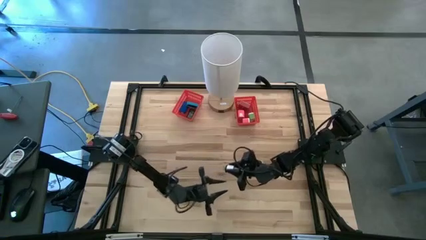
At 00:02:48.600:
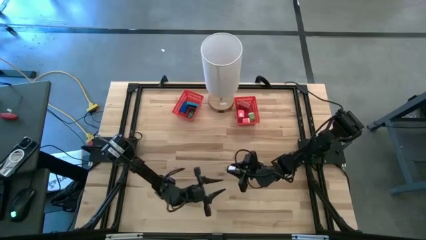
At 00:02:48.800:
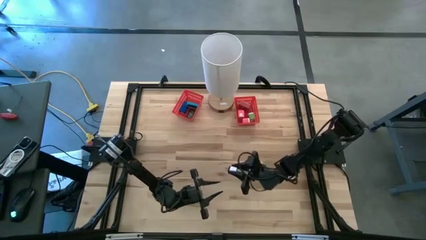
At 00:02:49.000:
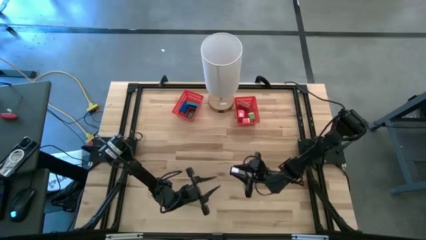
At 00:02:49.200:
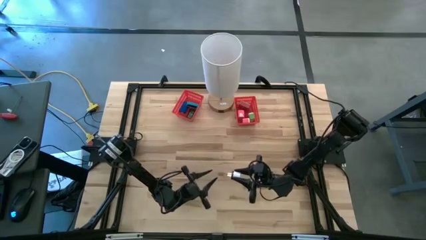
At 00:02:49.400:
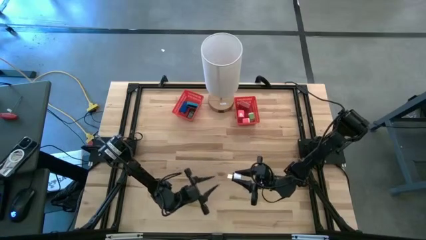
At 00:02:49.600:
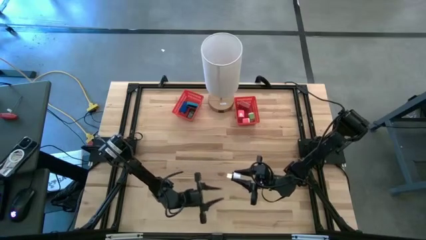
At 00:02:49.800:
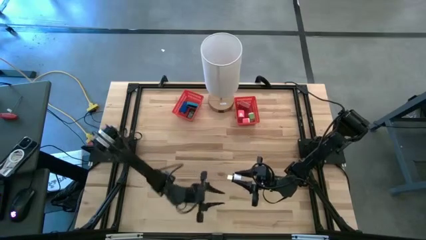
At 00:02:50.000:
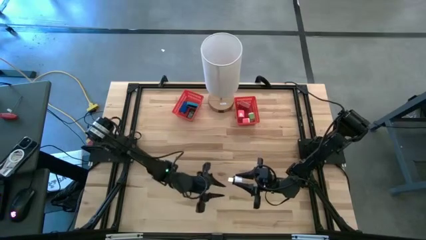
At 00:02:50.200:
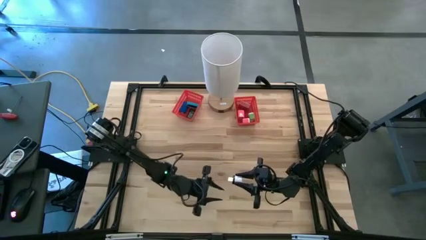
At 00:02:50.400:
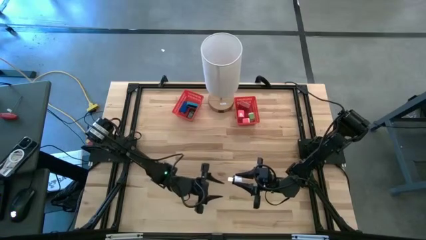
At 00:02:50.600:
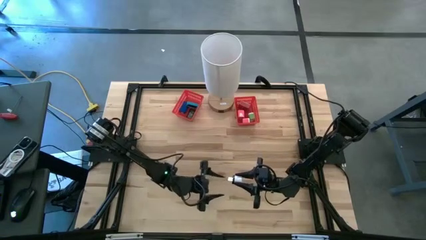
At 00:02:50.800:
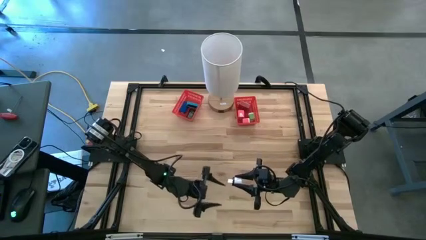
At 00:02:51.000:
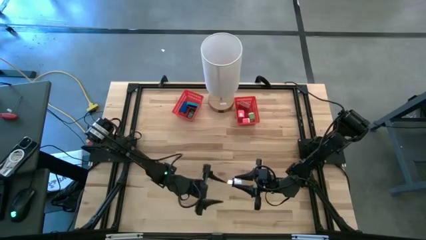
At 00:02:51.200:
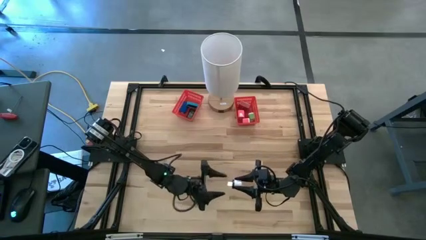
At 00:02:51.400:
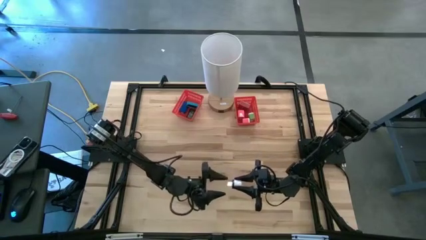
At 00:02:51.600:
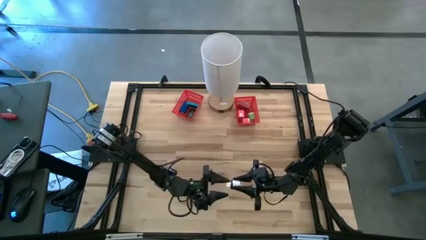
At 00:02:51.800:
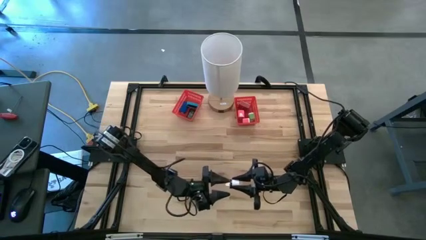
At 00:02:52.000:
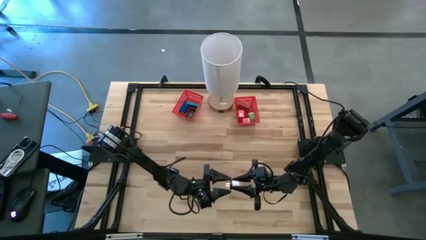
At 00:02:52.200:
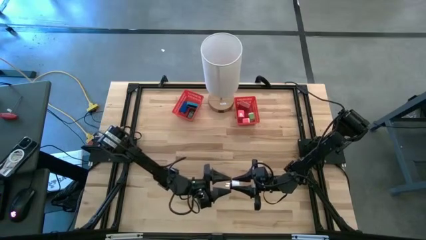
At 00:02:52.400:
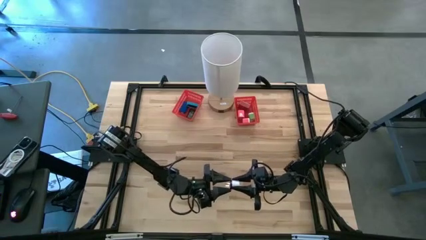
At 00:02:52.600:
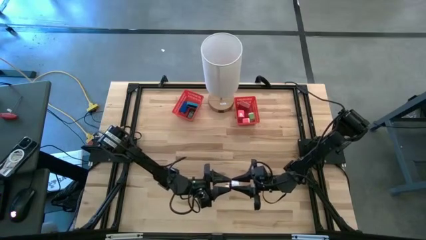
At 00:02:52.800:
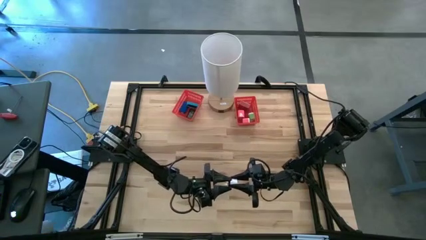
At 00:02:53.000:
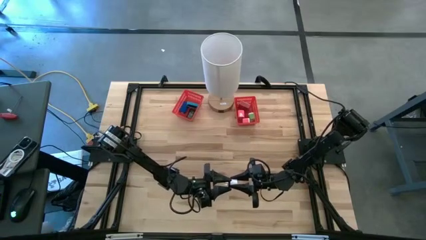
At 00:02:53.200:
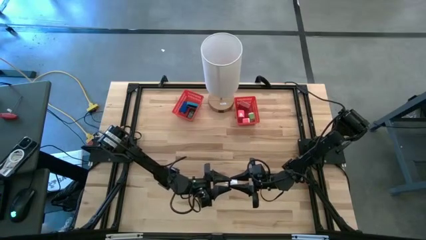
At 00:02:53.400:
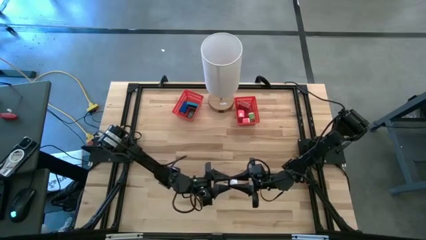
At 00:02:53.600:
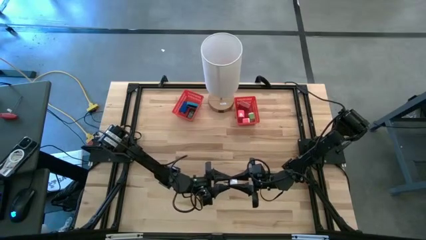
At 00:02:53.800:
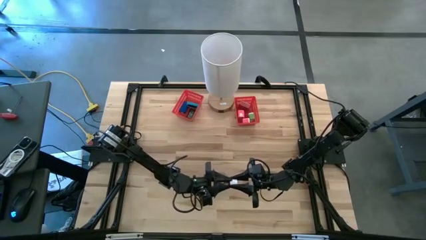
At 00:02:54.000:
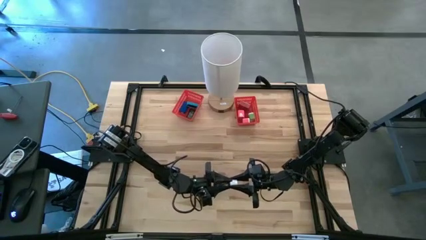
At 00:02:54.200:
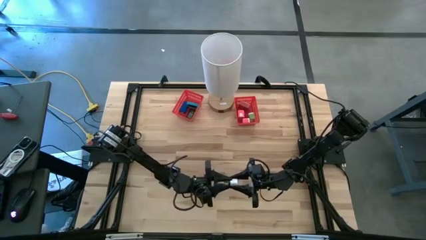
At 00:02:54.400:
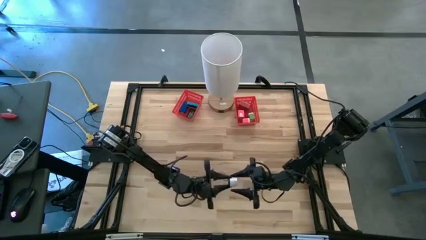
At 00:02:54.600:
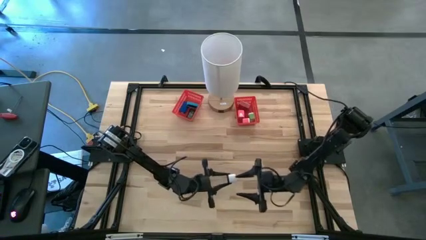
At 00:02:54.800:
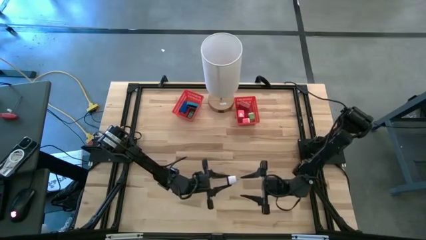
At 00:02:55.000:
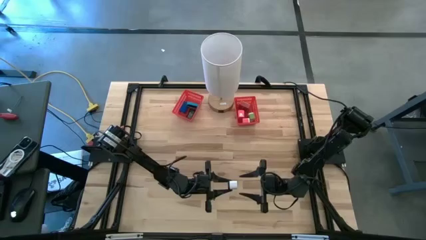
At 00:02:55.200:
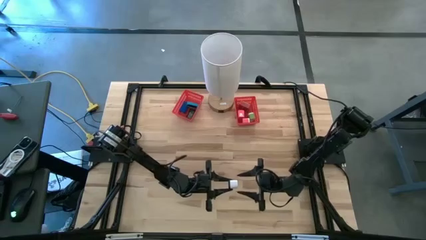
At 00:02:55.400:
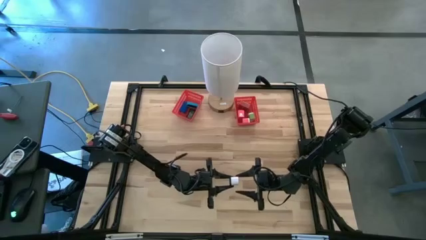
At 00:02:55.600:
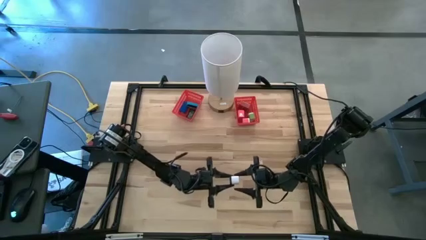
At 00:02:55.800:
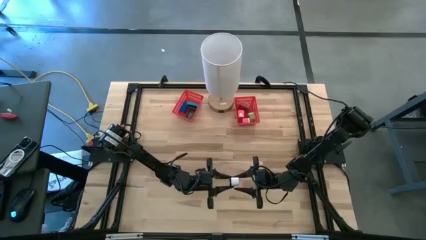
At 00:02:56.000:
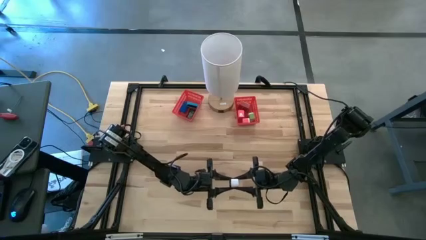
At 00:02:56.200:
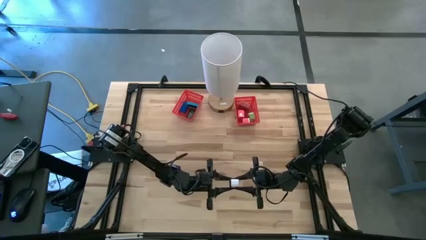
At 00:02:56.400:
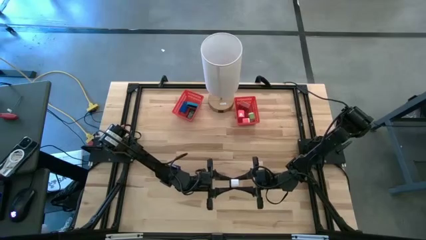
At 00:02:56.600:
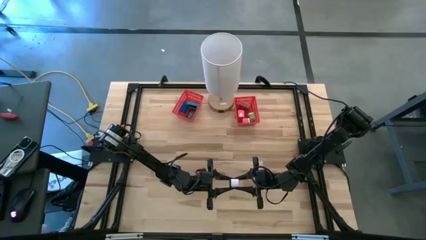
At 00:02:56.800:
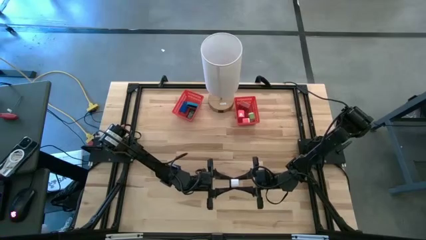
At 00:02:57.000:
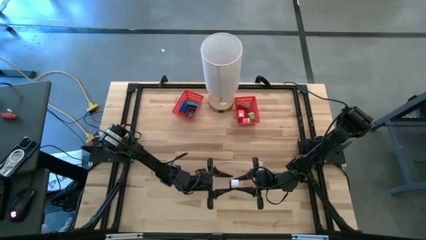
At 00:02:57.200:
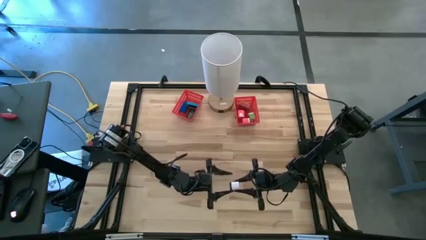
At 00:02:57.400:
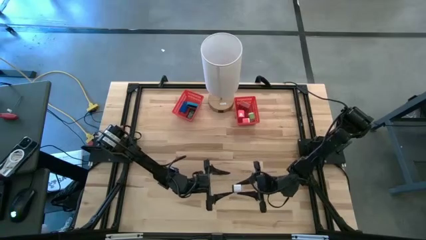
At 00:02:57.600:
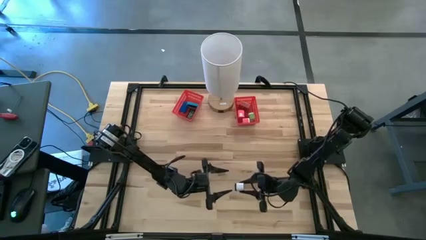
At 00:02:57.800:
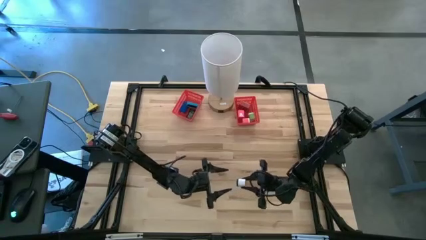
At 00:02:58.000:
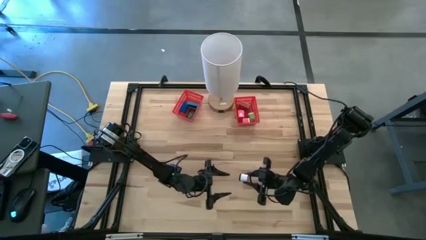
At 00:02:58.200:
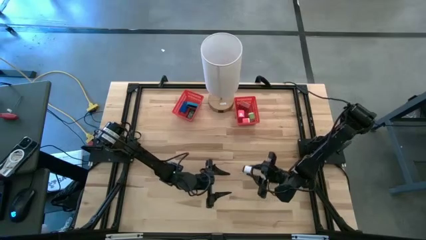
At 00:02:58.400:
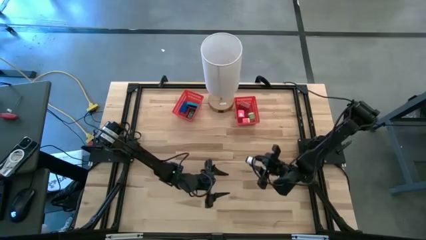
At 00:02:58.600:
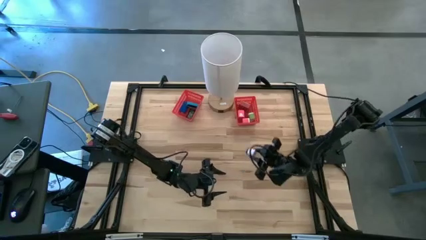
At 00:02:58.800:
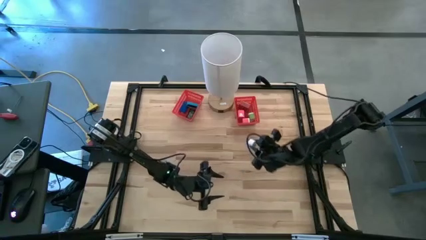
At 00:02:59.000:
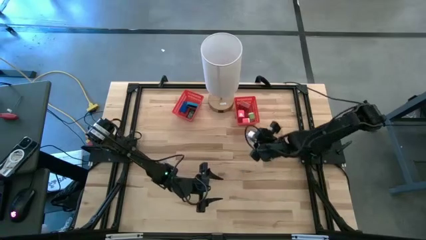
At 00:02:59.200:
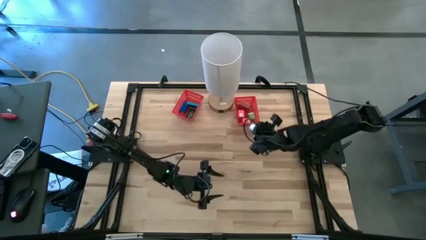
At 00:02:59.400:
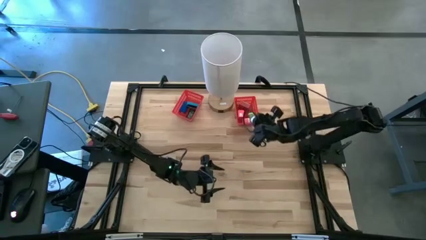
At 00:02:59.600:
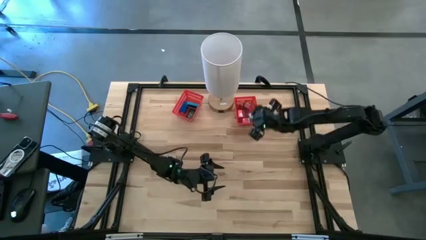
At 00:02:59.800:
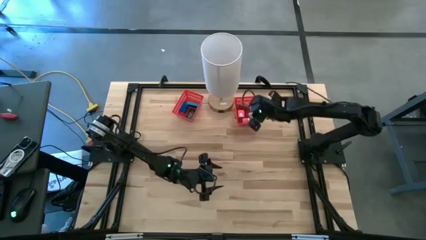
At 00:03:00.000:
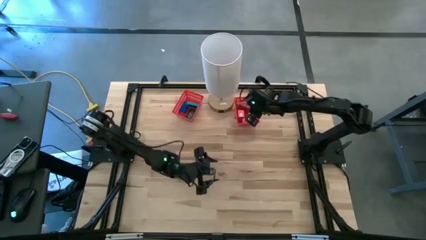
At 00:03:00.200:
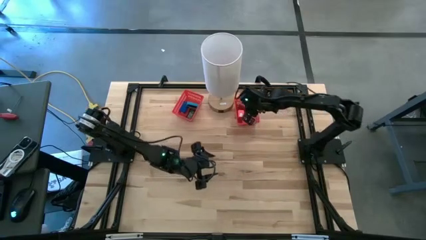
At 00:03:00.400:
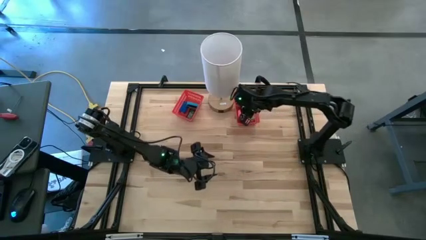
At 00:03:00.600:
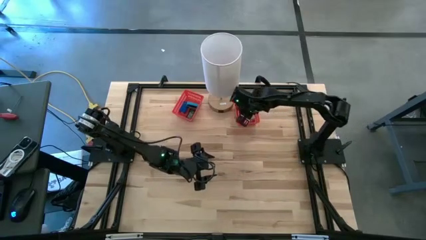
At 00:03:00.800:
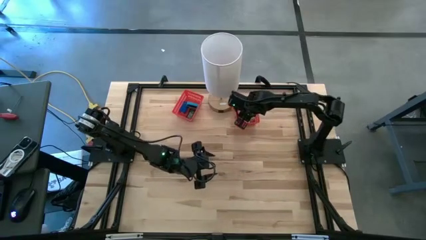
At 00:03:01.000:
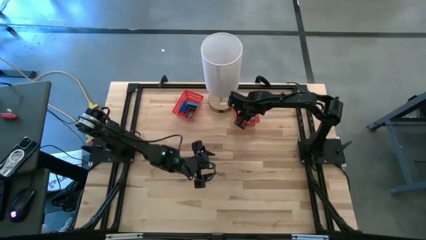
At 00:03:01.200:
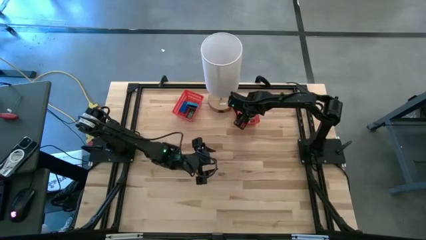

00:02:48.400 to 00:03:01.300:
Task: Sort adapters and digital timers
Put the white charger adapter into the right red bin

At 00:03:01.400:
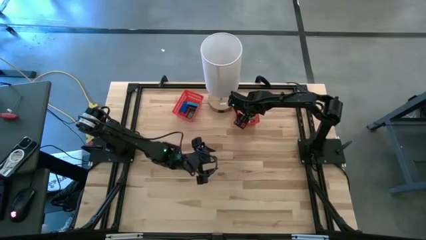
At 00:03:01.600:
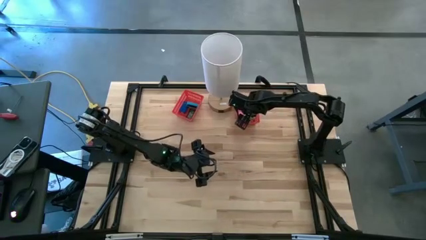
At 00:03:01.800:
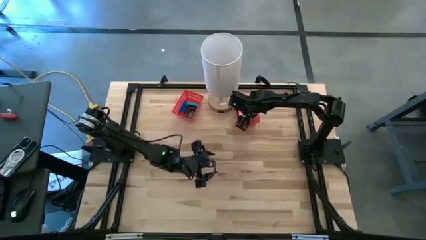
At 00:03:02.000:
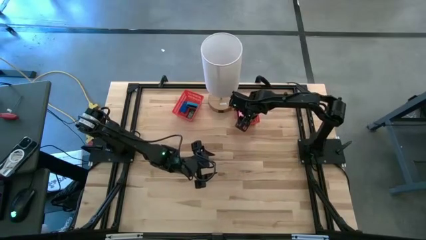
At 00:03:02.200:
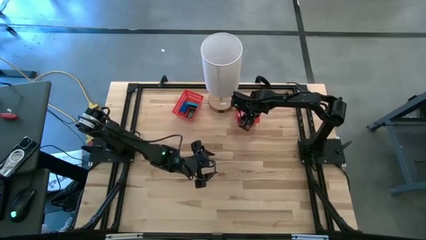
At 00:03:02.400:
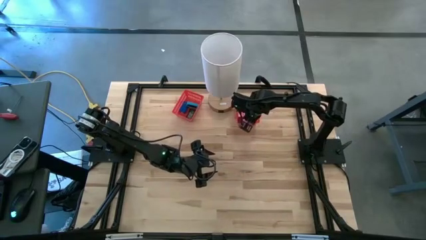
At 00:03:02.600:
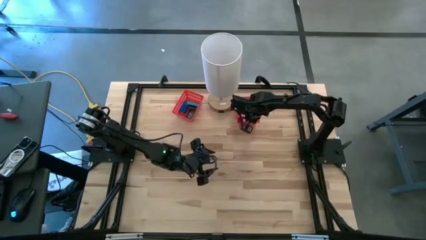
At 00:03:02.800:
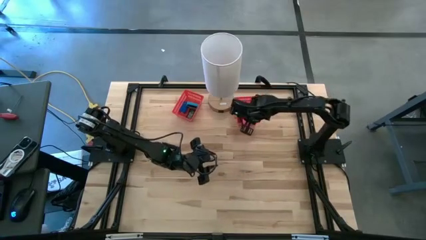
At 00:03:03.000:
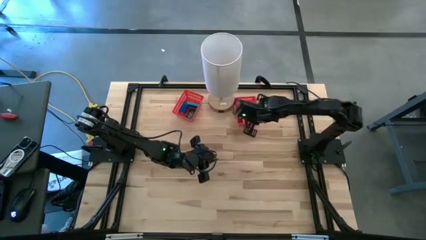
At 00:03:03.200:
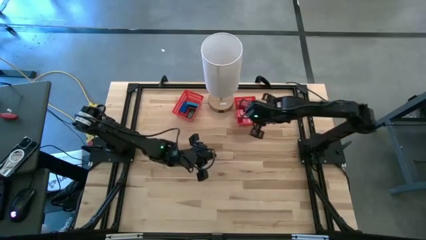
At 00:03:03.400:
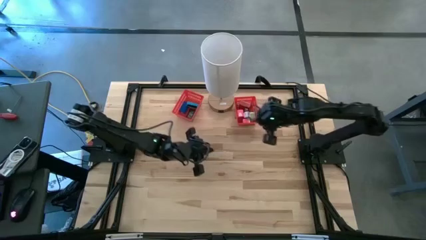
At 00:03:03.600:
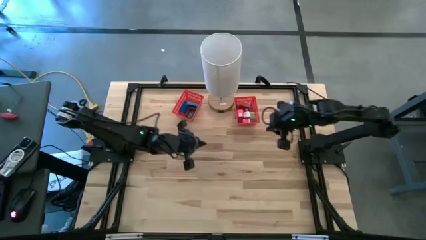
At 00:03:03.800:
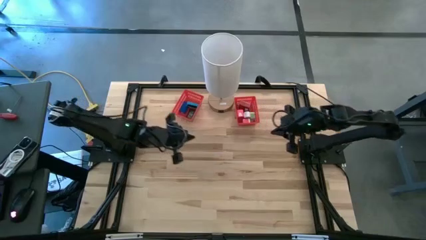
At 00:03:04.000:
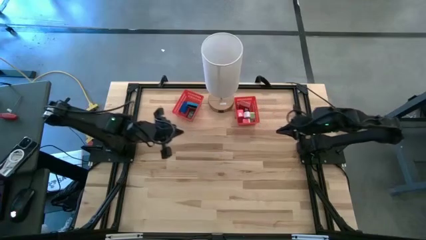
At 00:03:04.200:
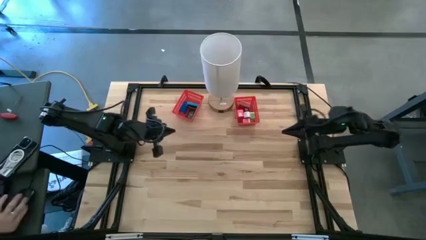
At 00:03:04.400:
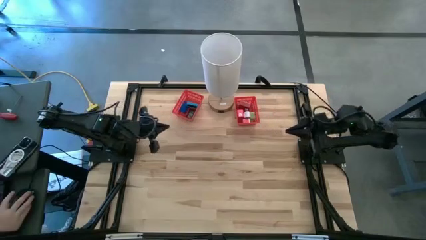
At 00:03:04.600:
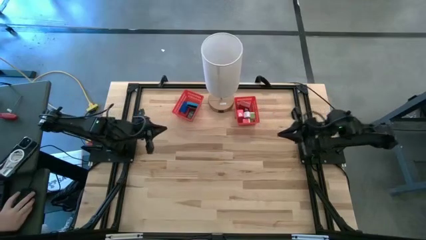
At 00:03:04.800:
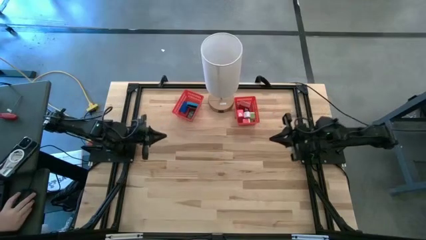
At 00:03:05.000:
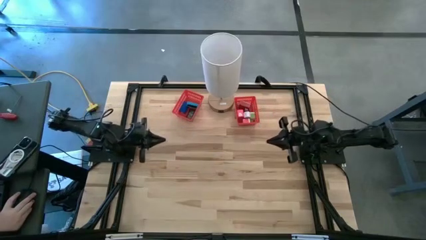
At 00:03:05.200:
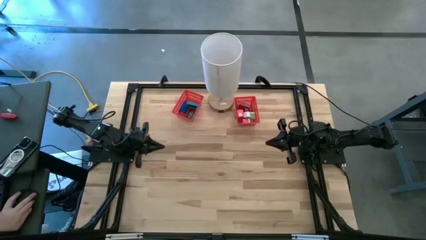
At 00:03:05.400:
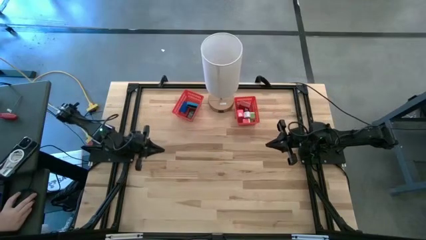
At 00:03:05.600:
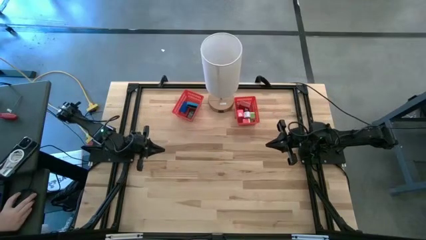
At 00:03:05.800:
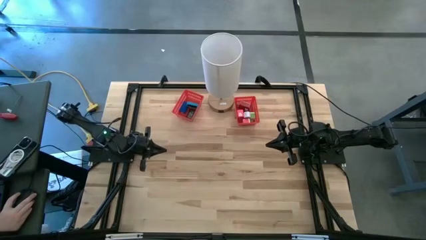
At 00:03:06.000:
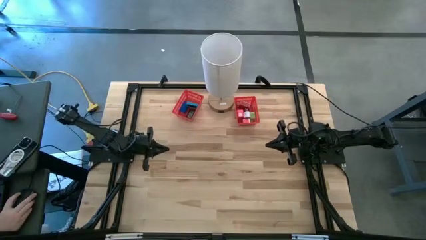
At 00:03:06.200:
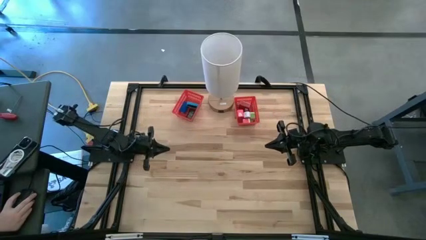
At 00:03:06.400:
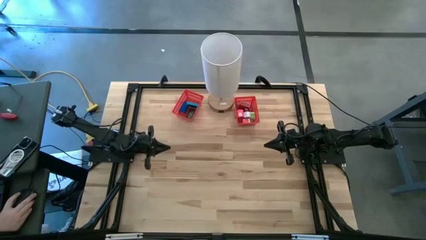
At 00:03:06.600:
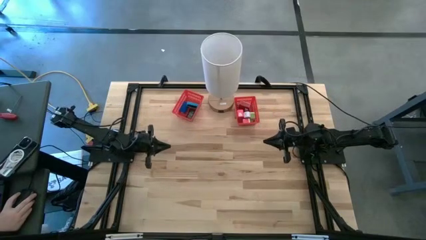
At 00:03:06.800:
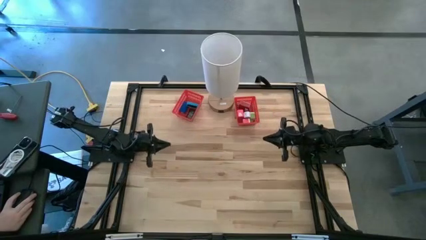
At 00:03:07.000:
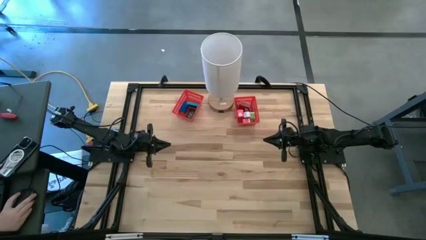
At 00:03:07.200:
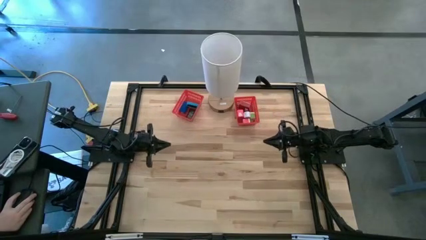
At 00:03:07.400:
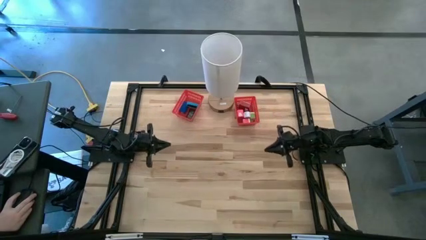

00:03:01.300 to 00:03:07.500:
Return to Home Position
